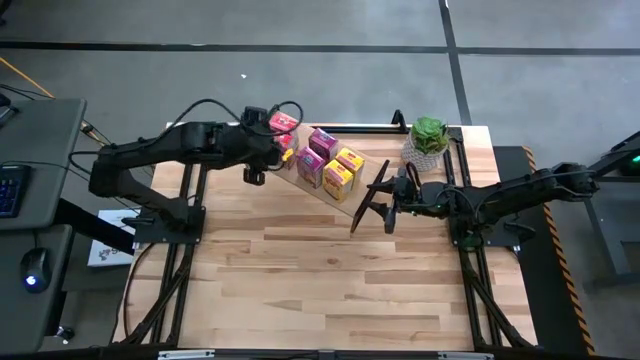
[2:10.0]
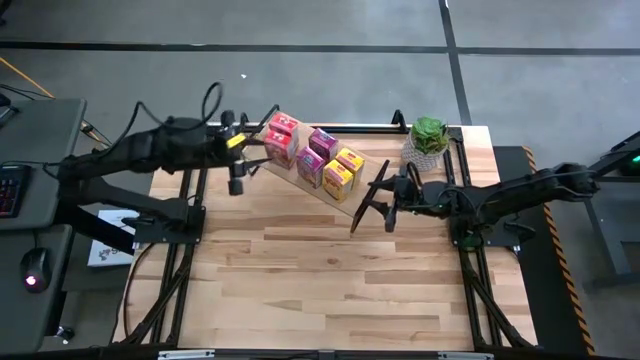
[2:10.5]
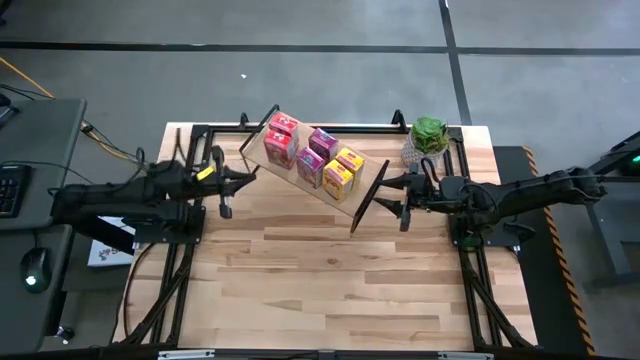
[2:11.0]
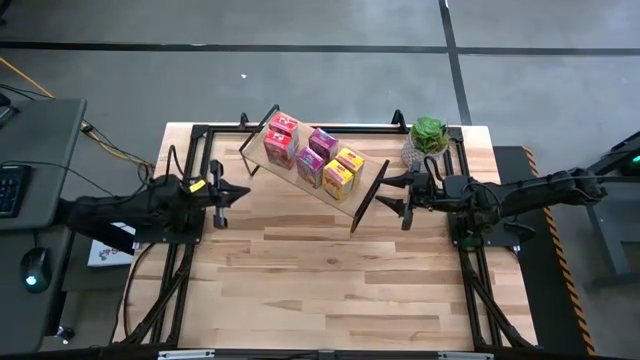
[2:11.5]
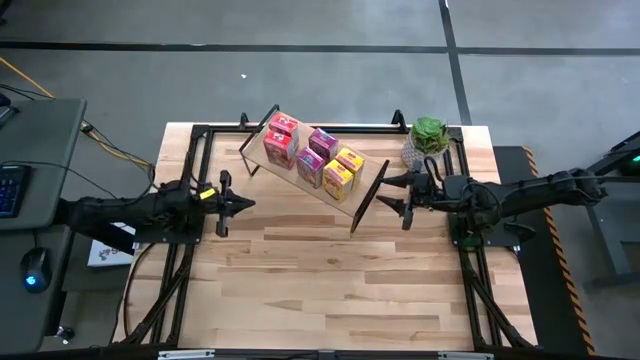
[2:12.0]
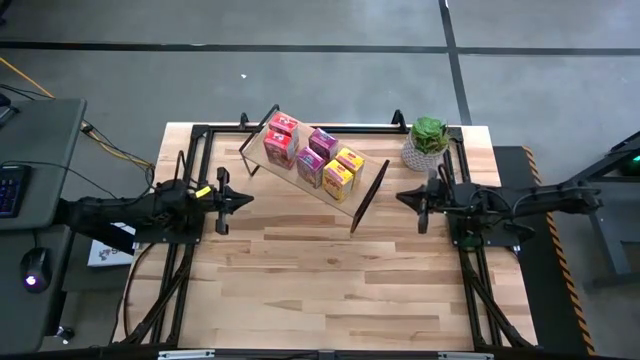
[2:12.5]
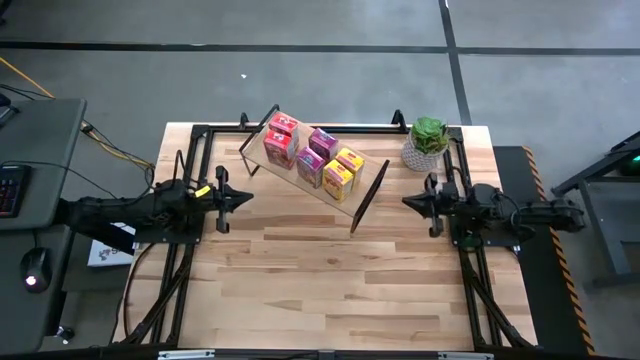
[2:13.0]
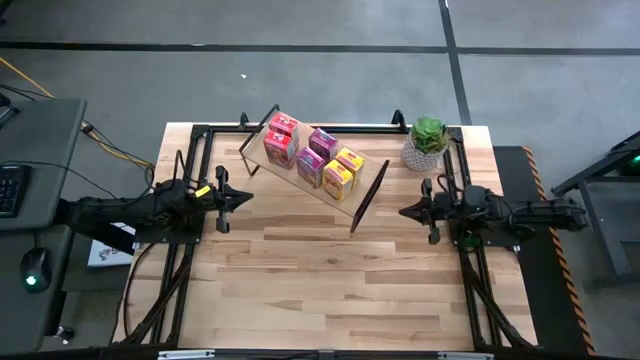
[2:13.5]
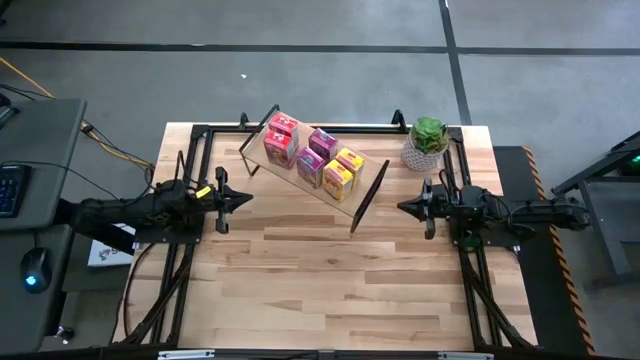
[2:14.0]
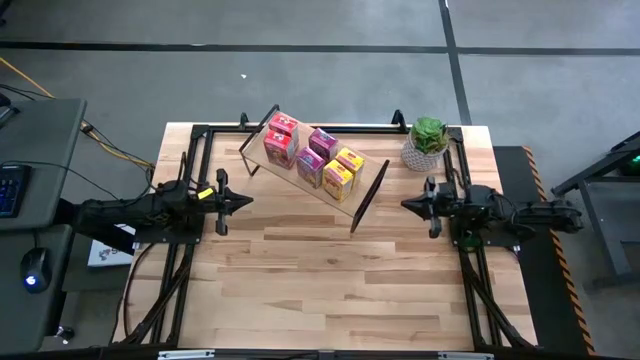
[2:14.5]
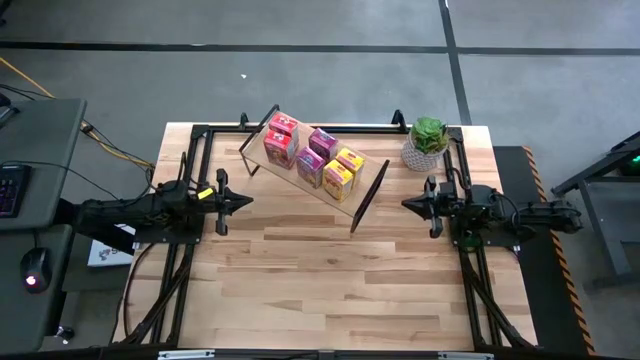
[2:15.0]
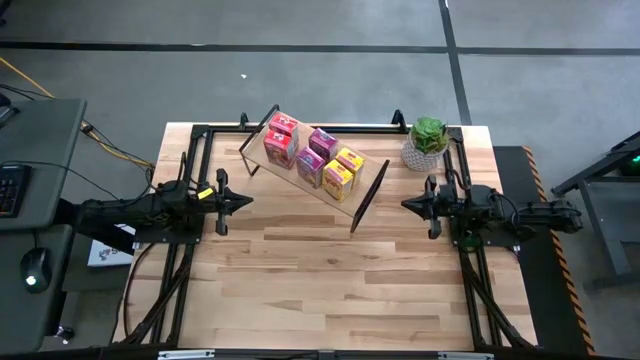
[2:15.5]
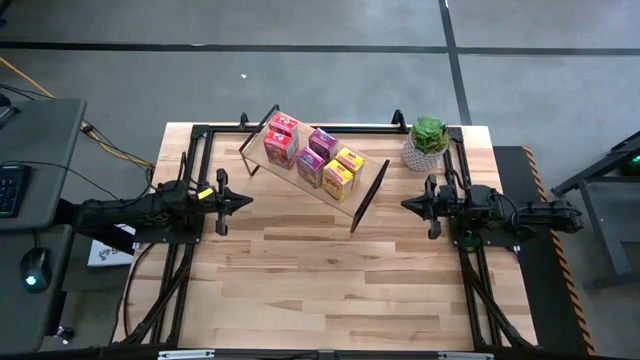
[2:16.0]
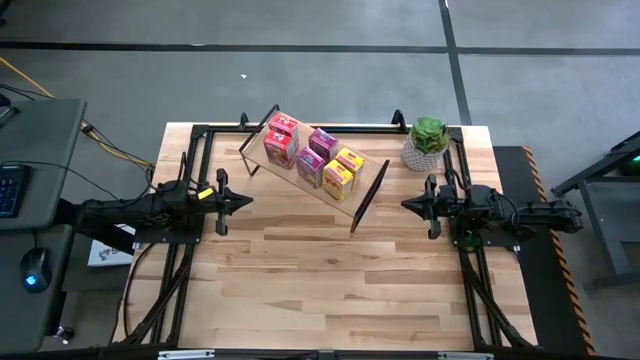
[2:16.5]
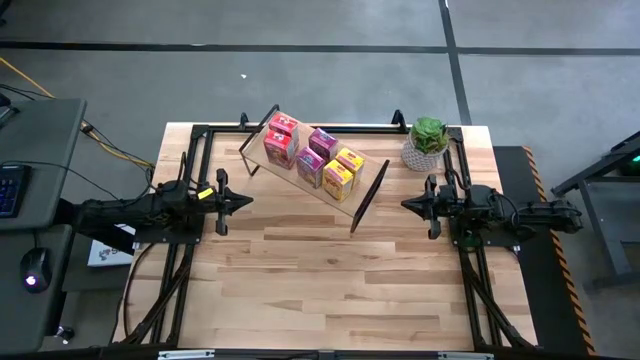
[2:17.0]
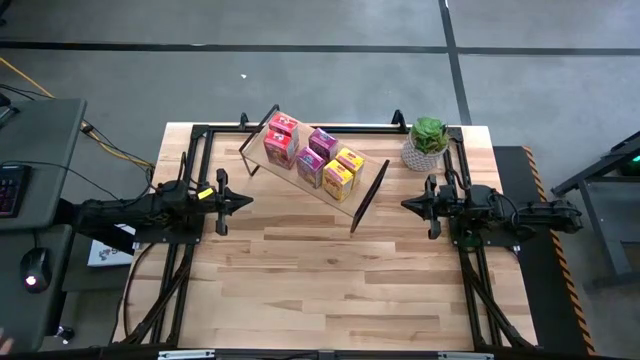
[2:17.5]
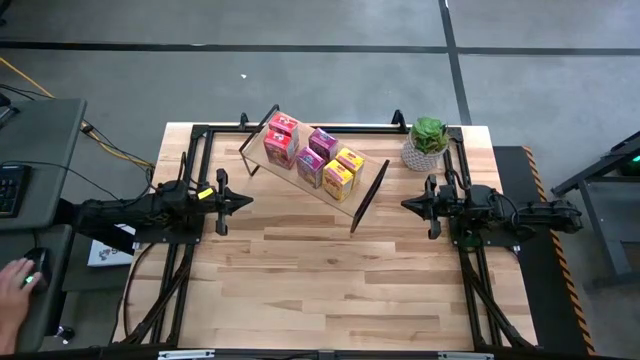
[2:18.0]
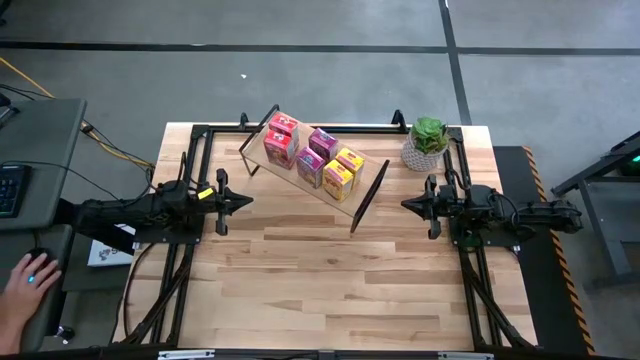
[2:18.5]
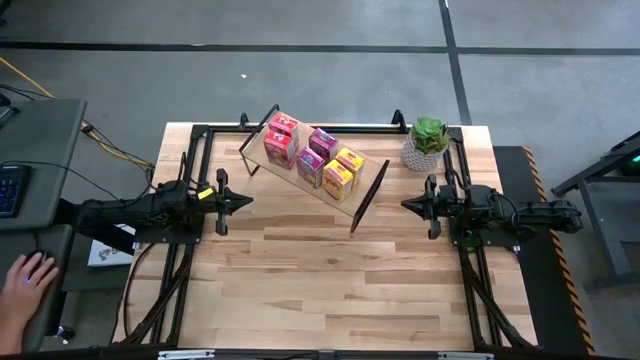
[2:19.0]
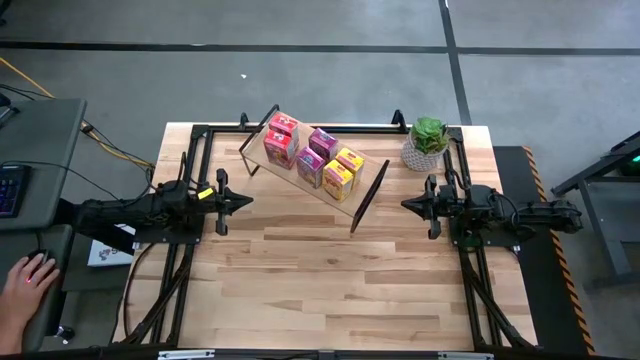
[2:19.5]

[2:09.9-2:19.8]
Task: Stack cereal on shelf
Return to Home Position

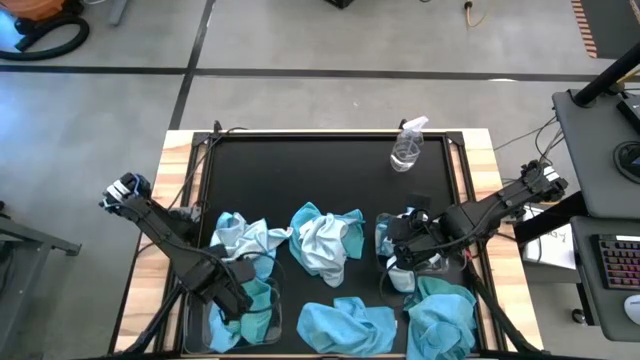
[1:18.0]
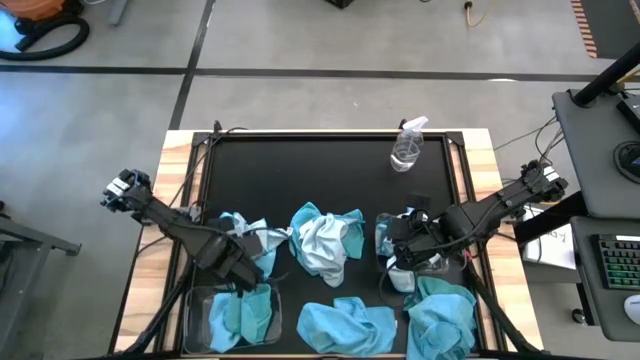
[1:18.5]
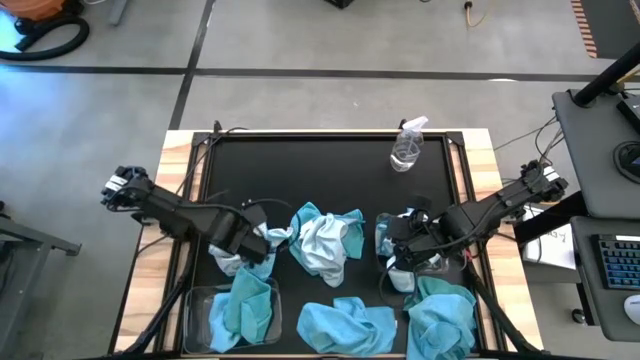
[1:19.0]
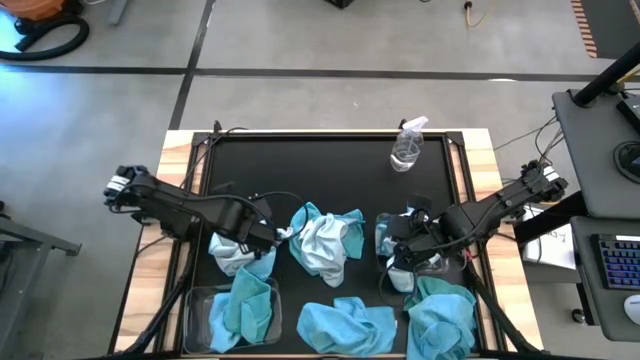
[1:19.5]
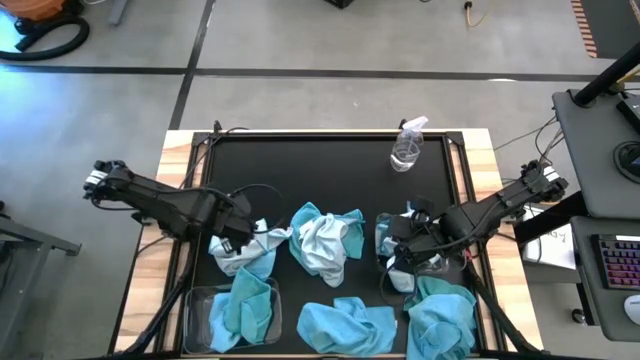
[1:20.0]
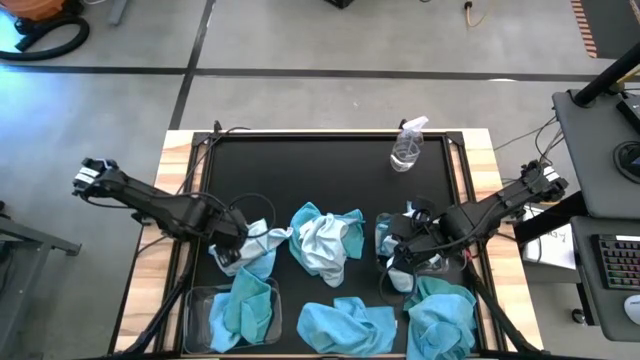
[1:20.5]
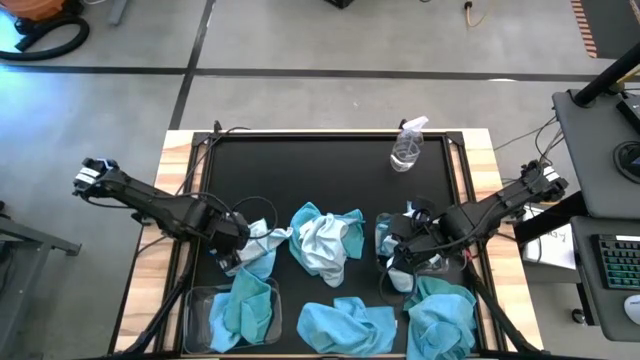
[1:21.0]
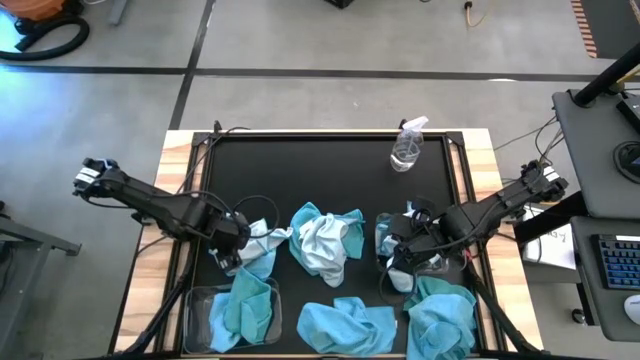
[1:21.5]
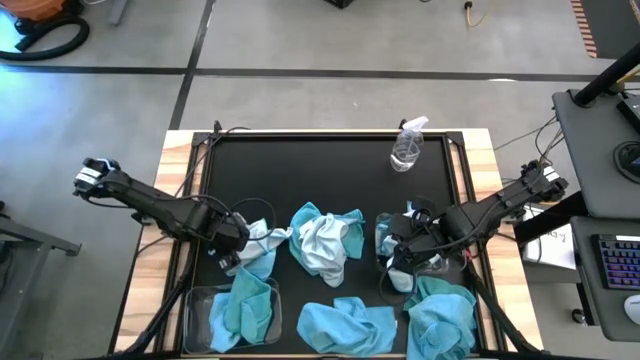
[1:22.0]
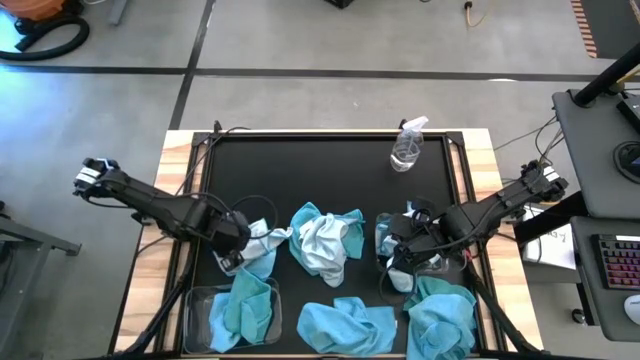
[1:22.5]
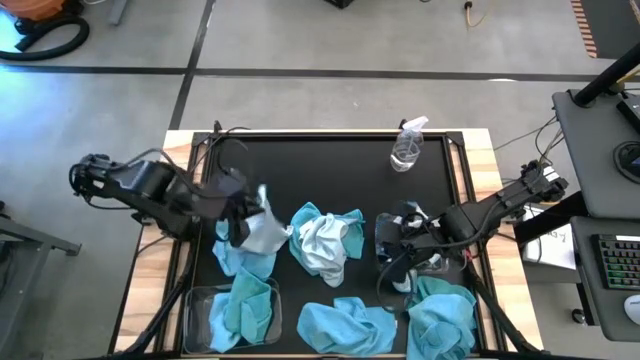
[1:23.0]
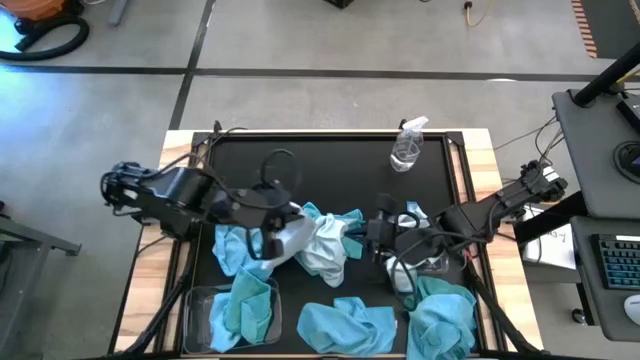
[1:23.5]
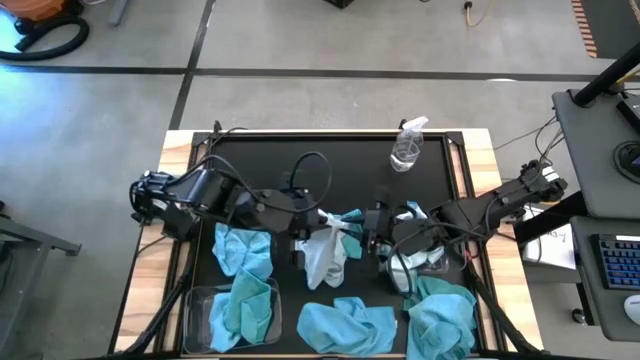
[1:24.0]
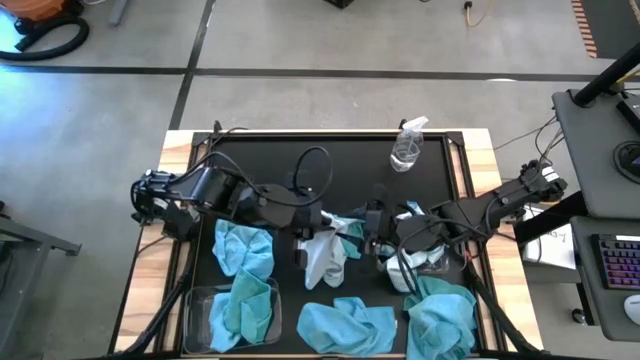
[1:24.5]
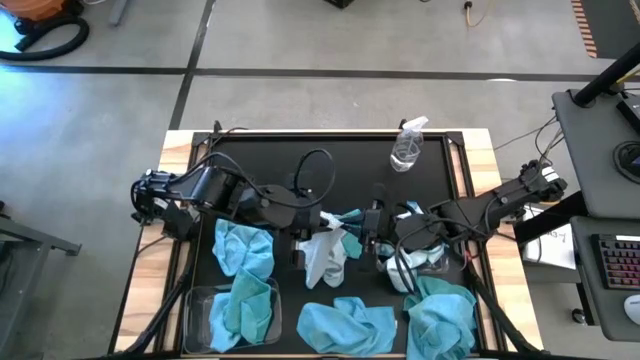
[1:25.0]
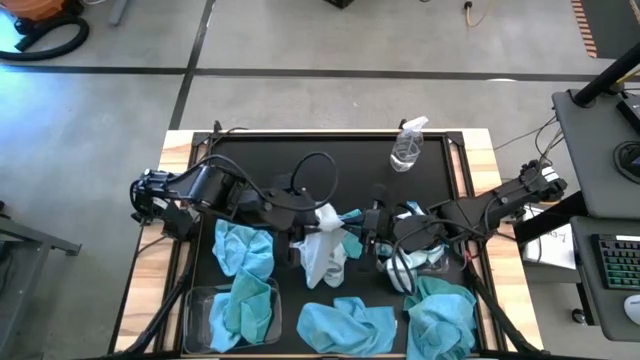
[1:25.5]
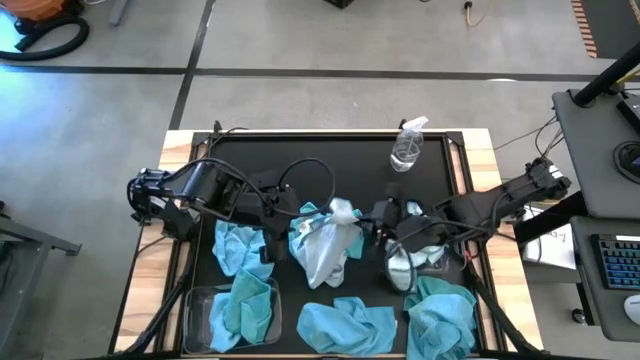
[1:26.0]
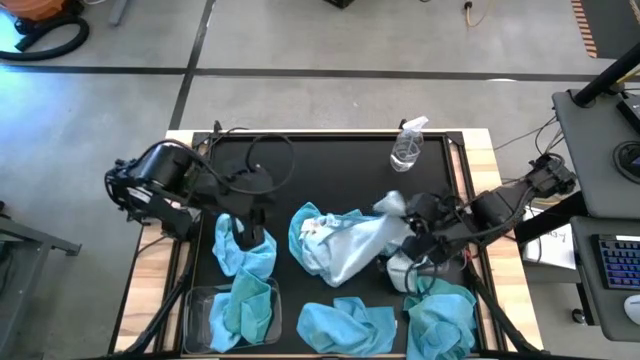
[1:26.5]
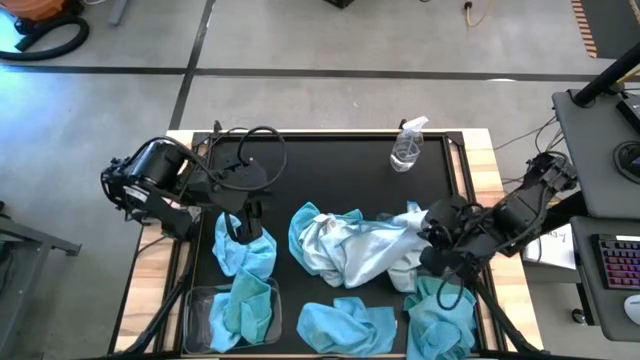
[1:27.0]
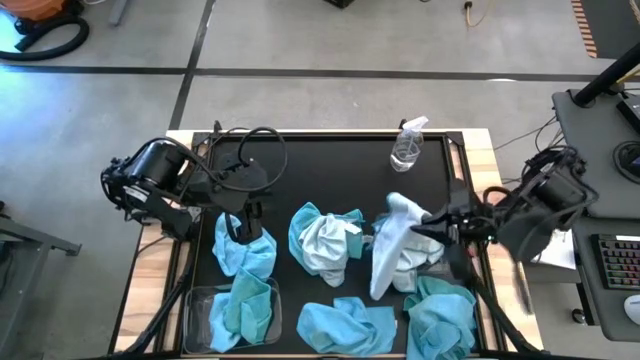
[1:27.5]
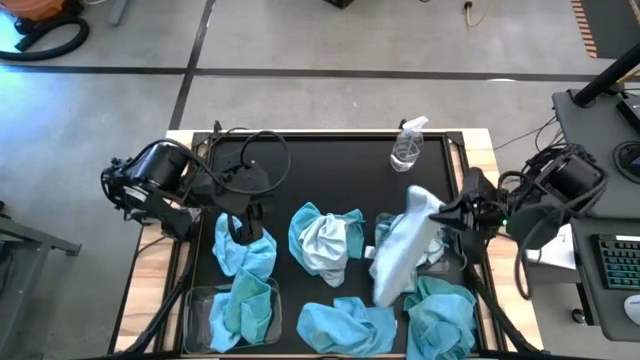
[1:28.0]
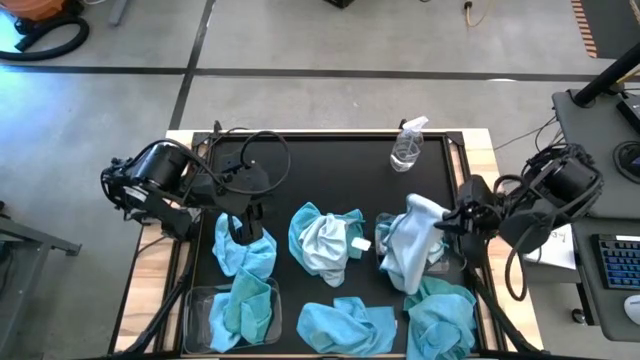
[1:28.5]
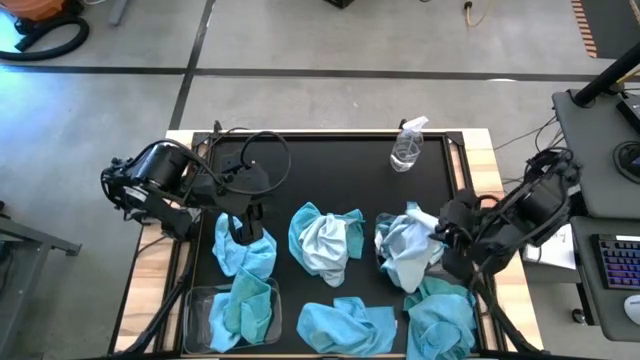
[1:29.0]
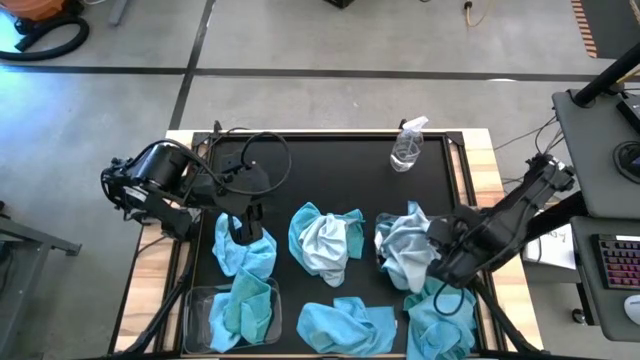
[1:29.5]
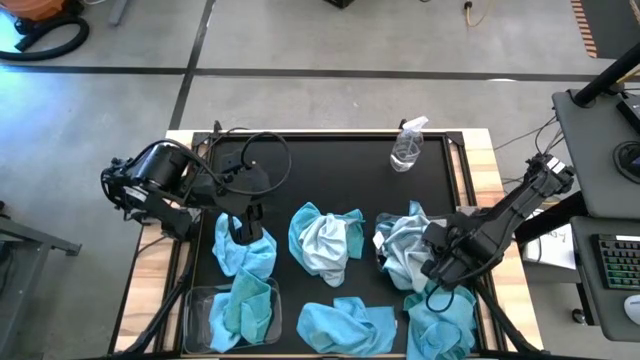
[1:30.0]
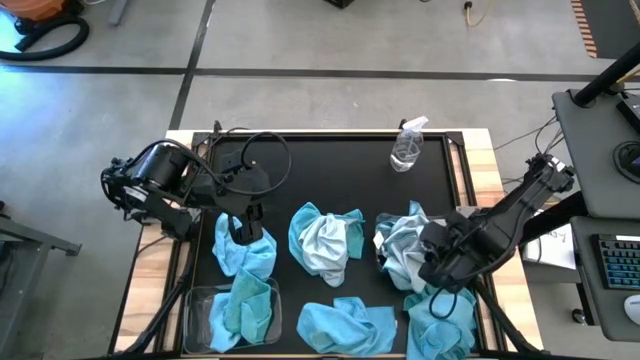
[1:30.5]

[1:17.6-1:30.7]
Task: Sort microfiber towel by color & place in baskets
Put the light blue microfiber towel into the right transparent bin
